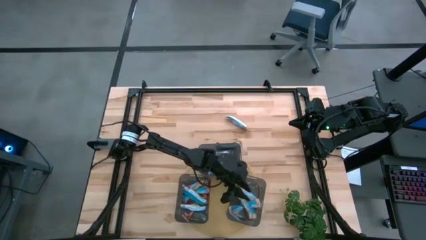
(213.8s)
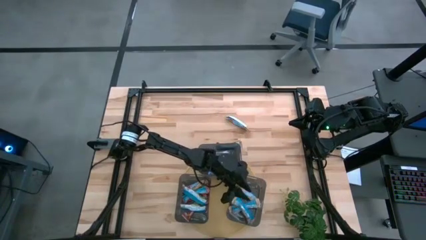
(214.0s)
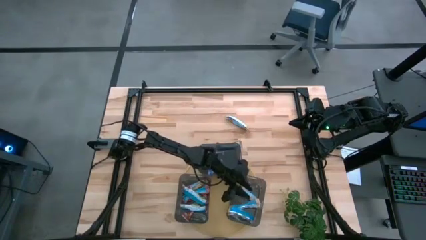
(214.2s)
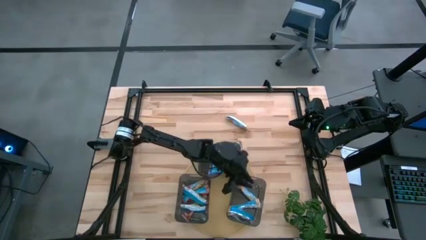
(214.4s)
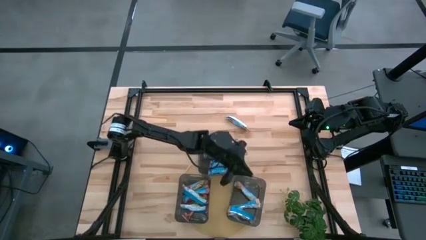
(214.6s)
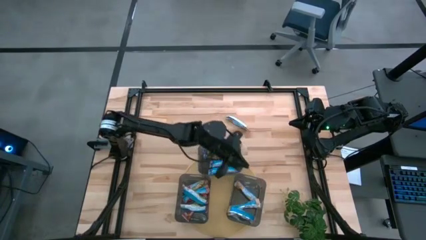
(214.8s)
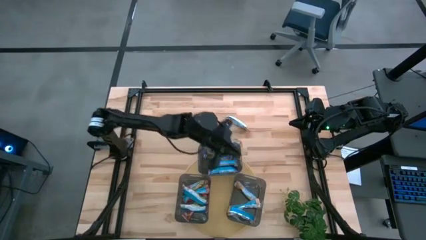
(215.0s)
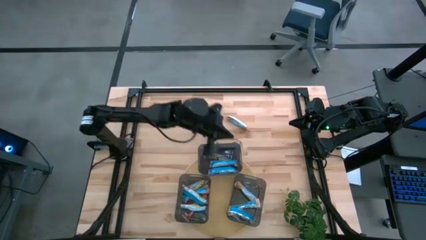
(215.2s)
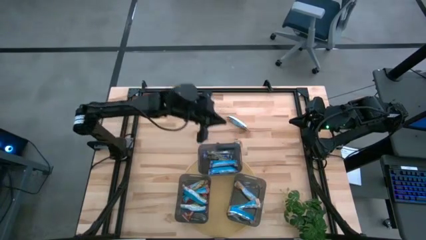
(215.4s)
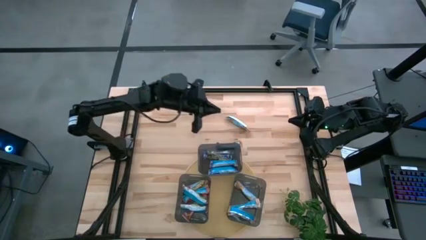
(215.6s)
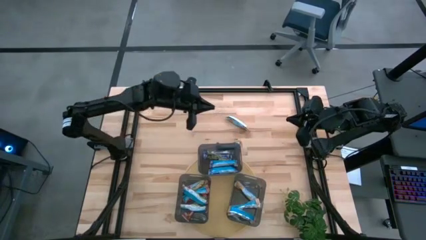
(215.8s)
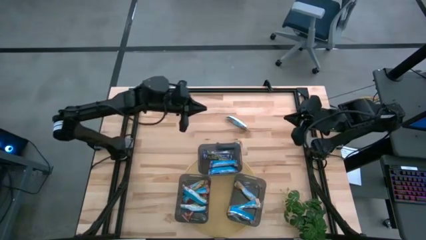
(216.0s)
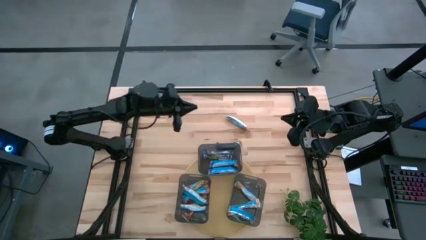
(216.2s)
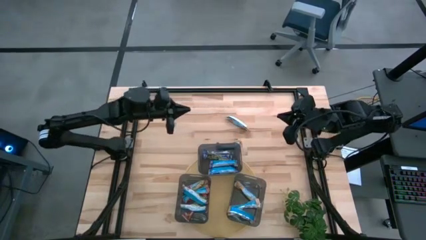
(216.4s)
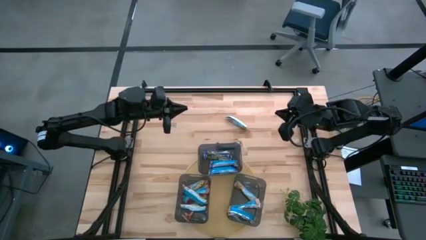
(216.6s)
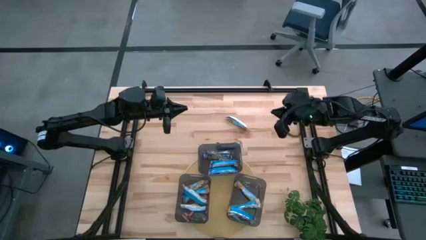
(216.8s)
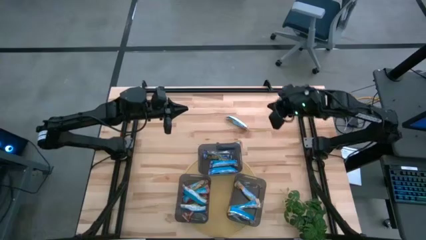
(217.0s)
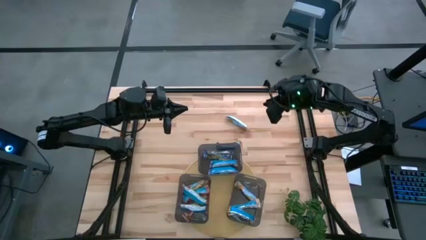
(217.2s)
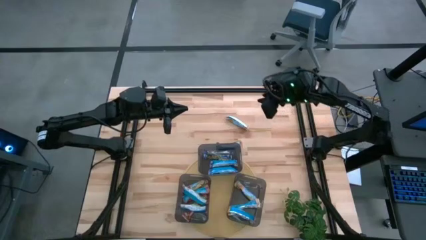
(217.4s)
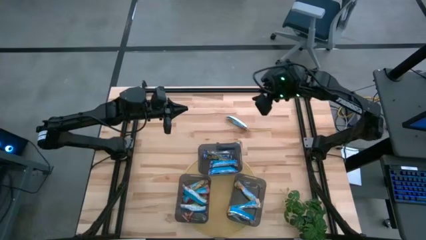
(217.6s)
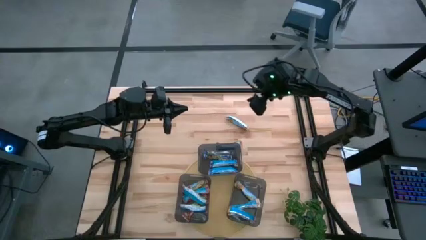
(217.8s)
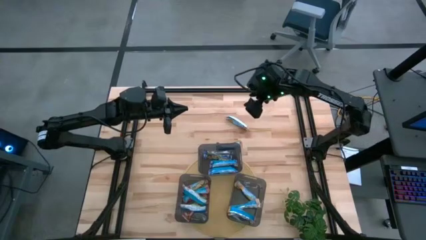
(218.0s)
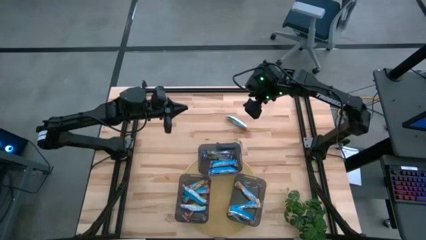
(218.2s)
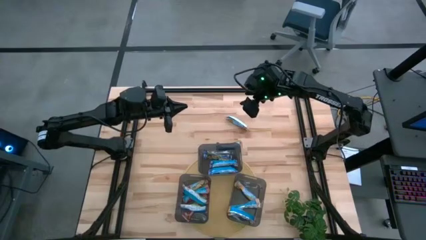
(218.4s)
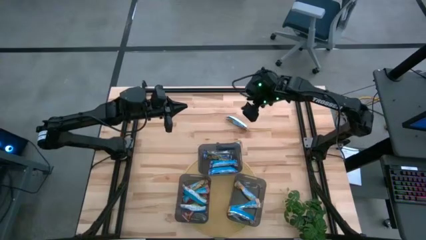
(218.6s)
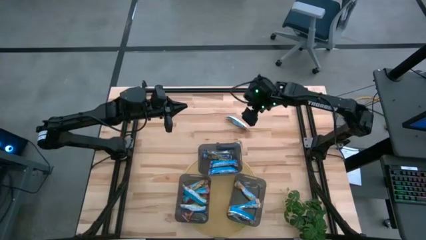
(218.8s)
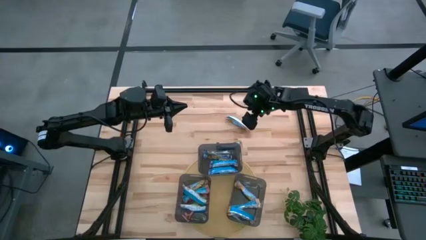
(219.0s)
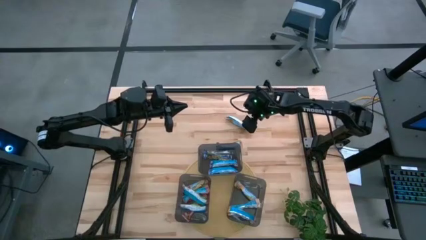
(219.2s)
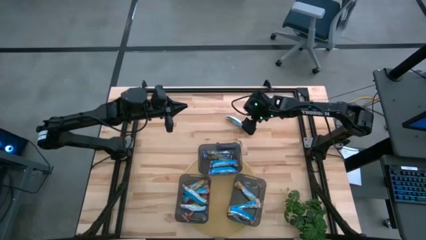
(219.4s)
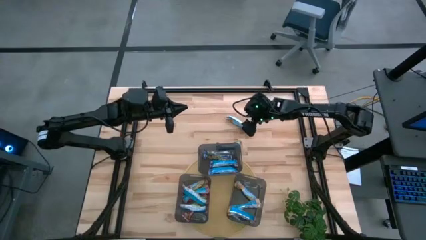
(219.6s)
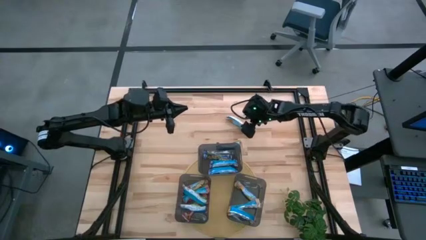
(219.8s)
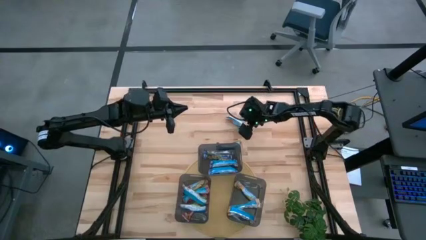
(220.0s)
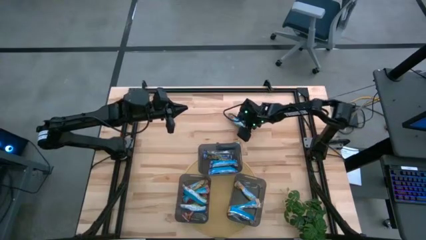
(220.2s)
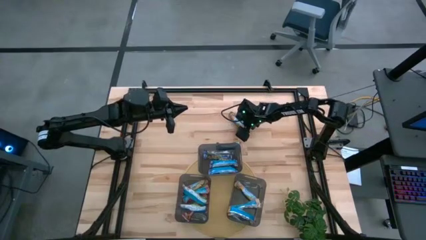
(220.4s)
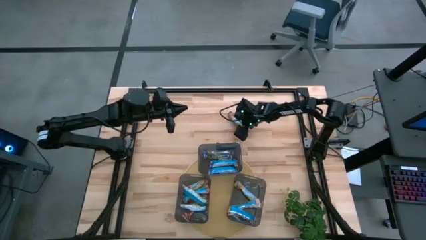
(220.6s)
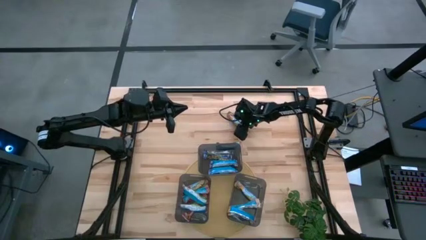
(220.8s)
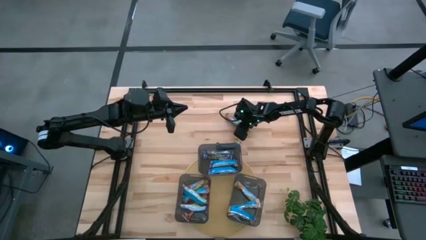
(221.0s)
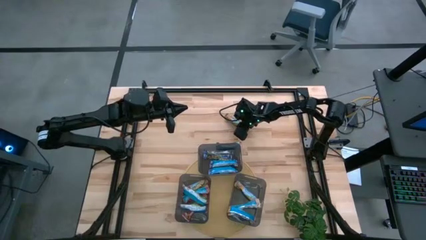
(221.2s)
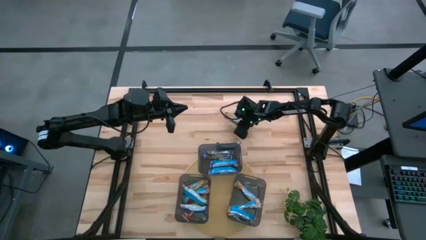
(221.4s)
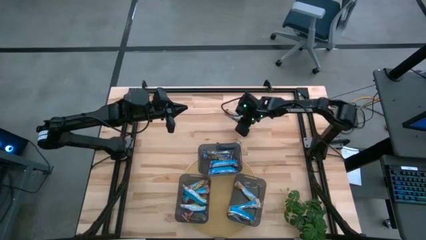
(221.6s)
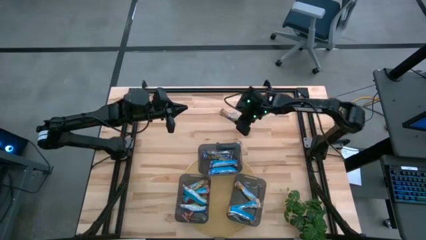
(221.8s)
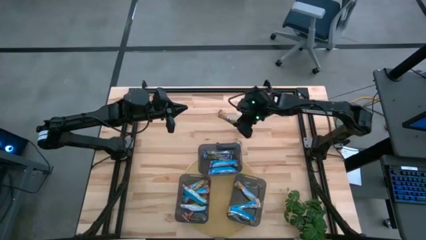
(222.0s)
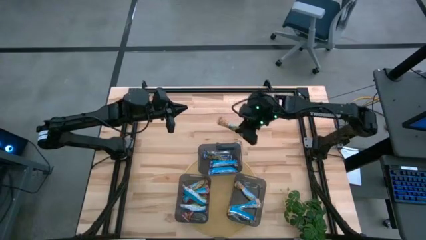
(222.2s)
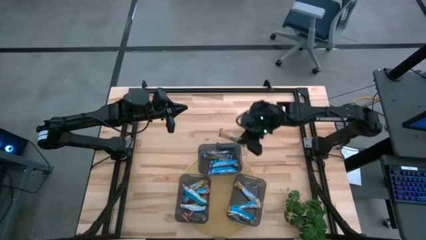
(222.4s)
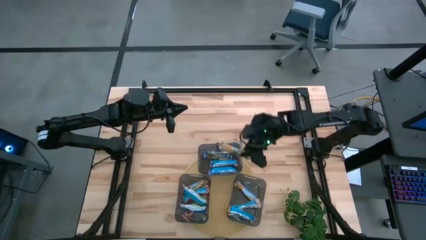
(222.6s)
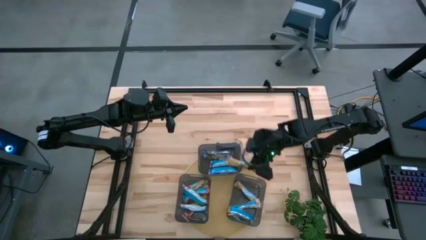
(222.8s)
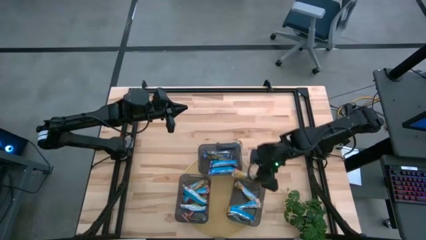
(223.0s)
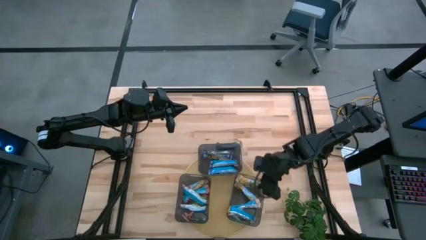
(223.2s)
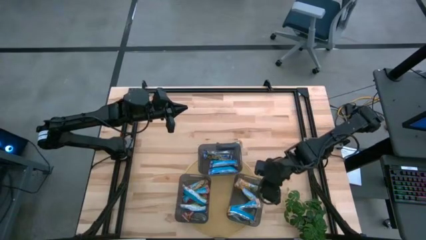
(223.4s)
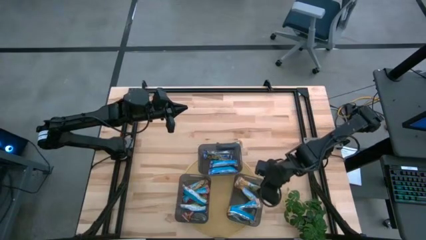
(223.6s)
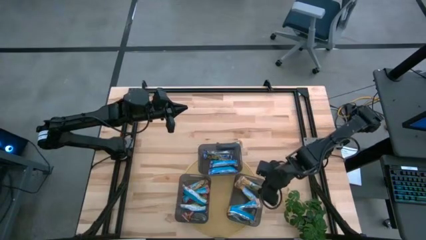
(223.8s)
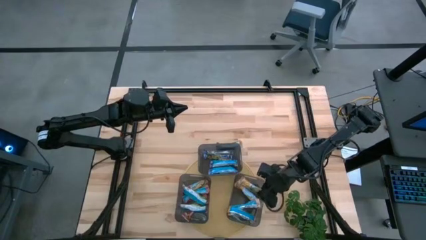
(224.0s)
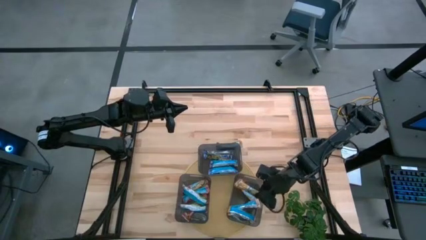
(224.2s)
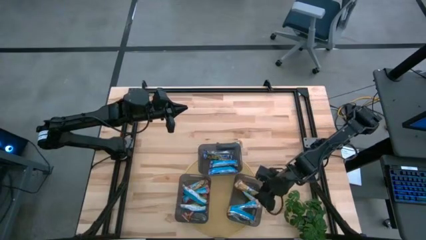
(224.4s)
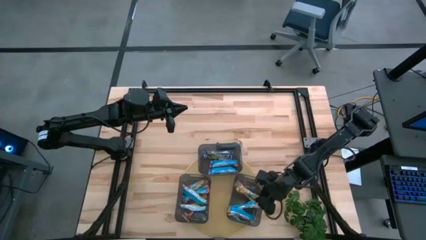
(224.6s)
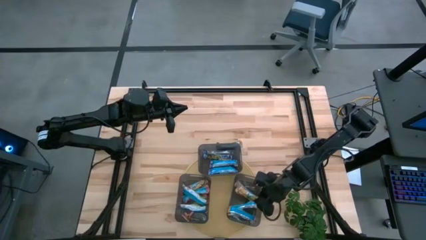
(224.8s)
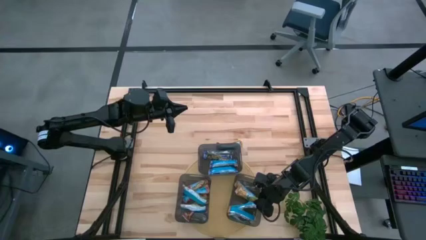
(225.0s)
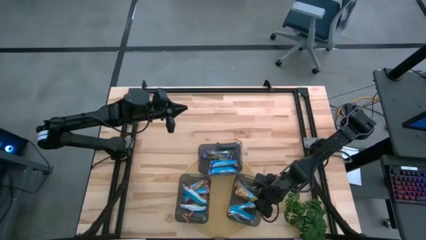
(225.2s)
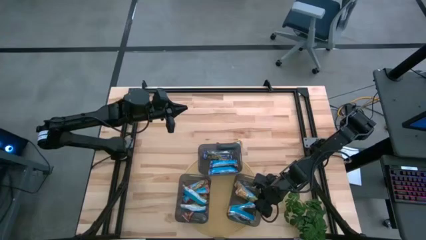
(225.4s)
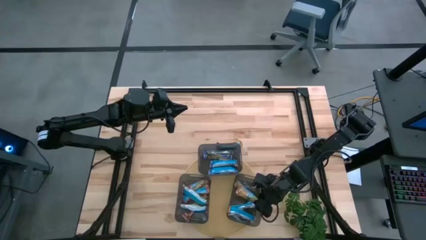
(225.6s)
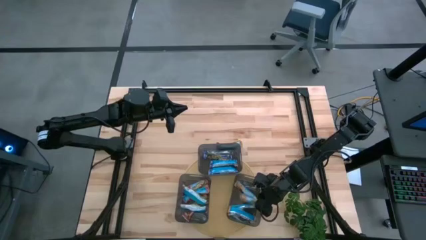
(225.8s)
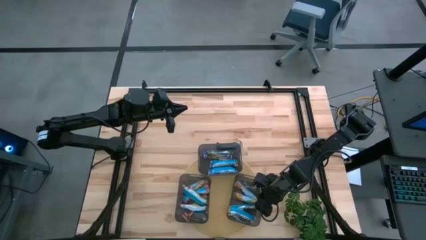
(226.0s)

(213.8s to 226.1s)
Task: Pick and place Granola Bars by type
Put the top yellow granola bar into the bottom right black bin

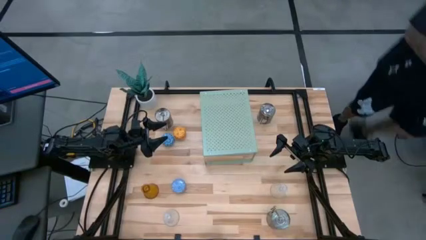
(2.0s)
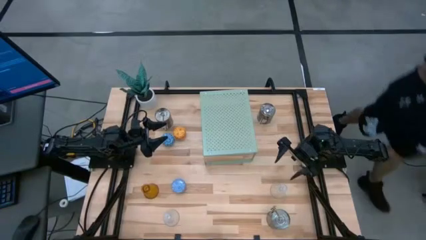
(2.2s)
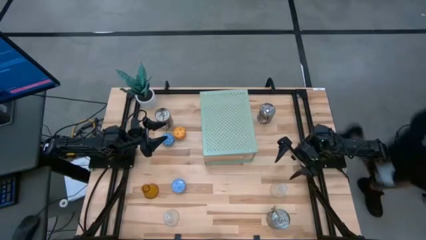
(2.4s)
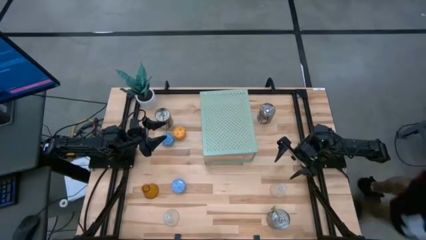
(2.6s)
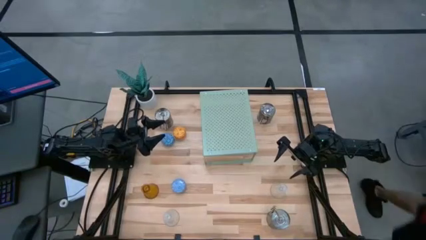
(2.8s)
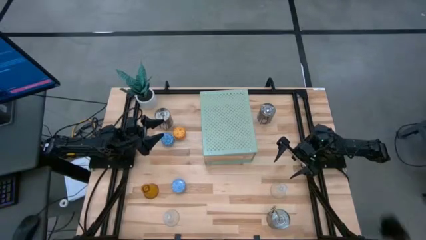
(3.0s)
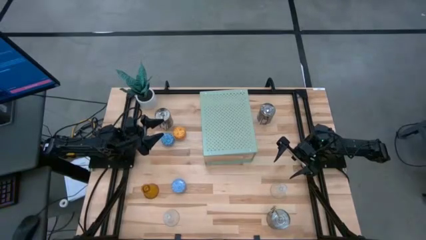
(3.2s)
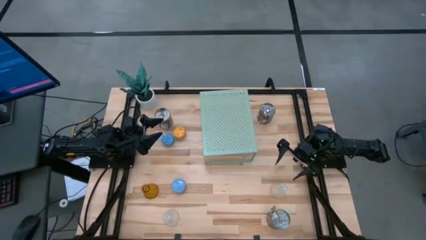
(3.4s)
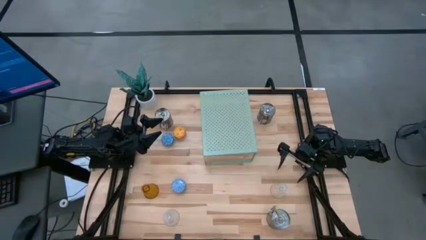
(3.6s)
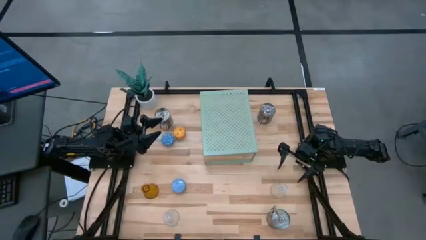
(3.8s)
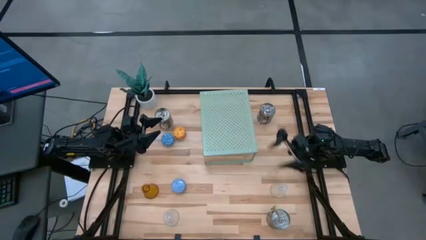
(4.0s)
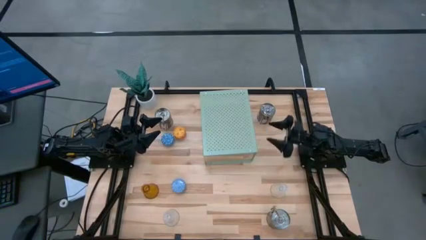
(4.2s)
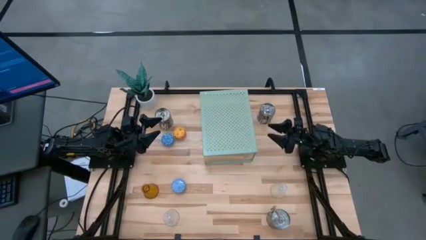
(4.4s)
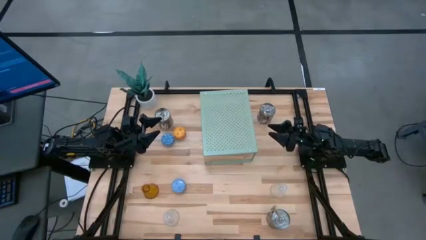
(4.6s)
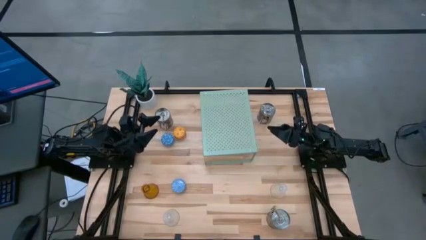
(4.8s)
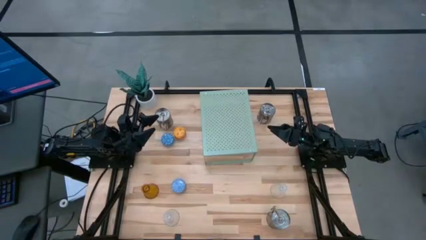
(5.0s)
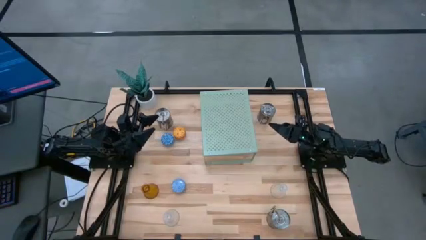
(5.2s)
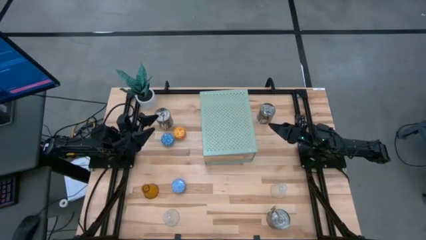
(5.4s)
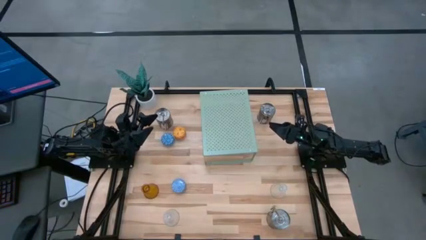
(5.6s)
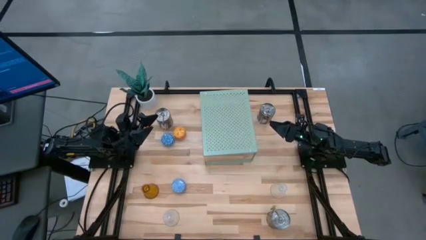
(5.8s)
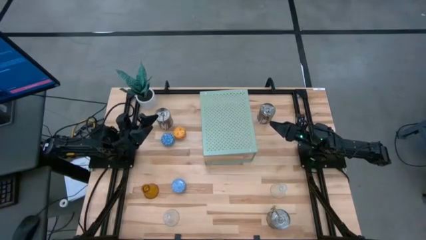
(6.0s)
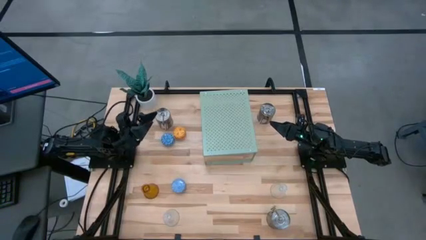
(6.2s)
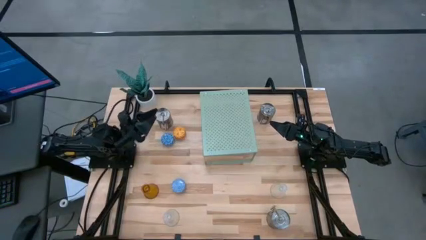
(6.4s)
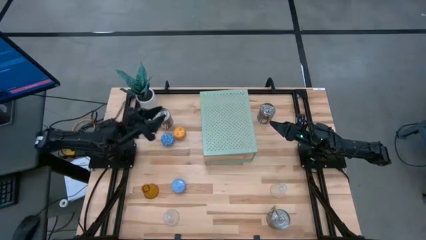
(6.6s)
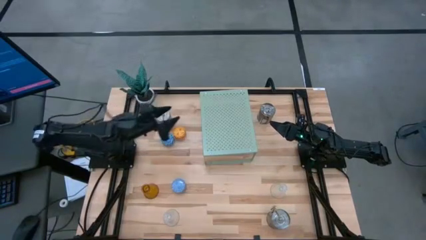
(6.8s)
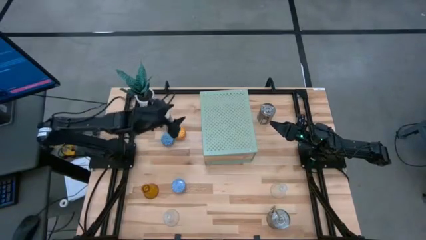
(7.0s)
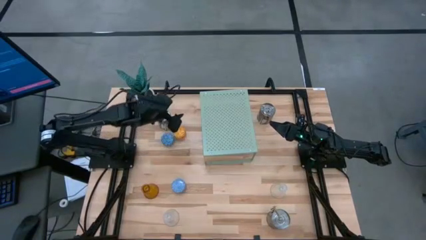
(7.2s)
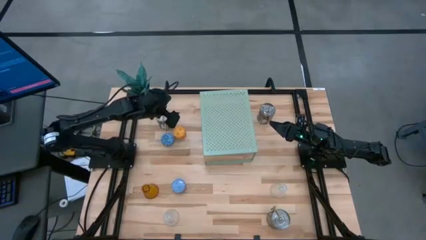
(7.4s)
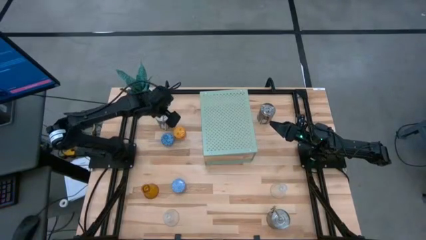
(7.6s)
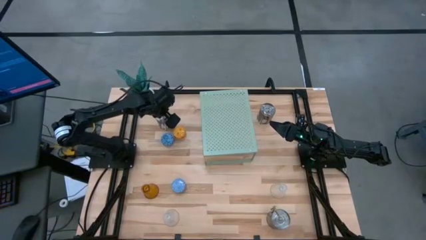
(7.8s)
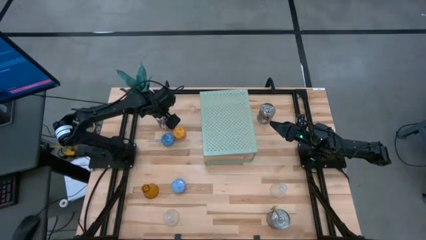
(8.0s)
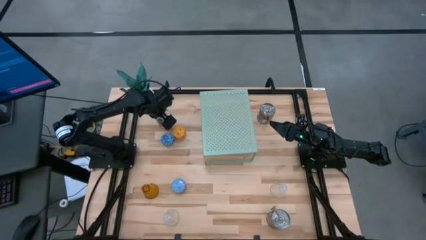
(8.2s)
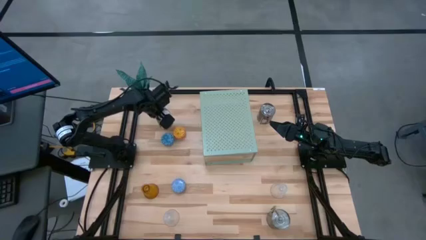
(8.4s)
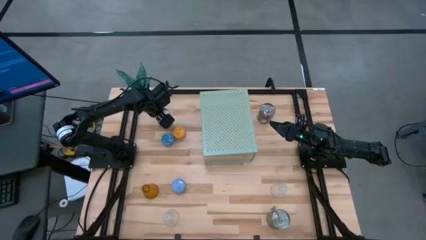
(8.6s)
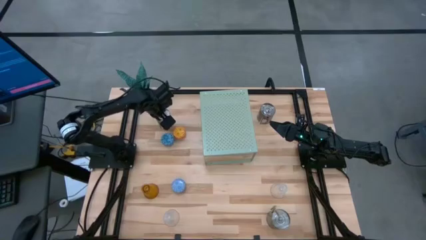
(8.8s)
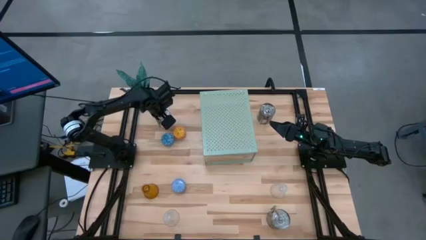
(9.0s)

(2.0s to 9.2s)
Task: Pick & Place candle stick holders
Put the top left silver scented candle on the shelf
